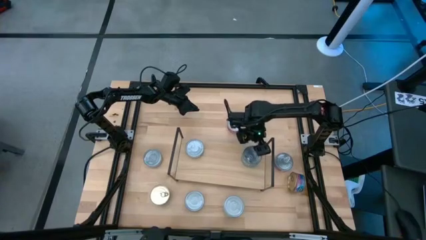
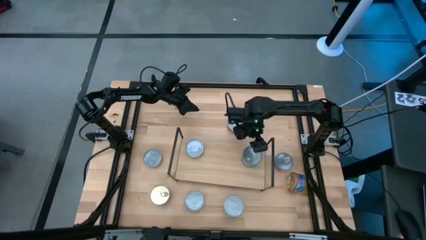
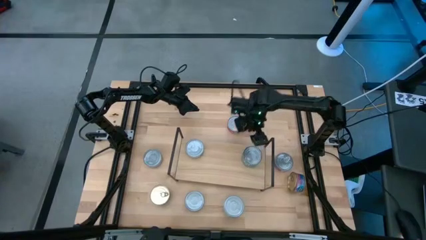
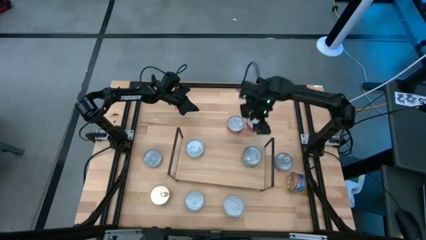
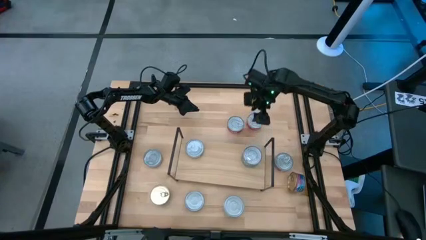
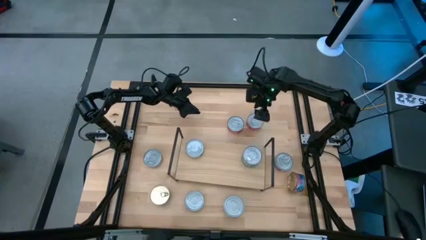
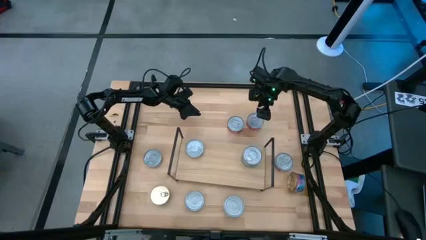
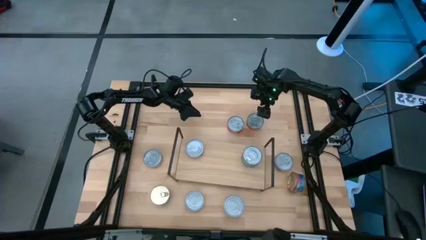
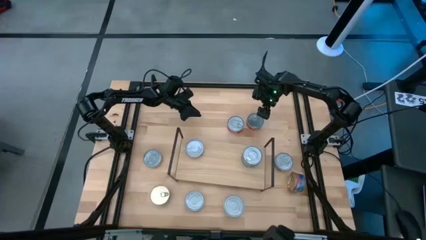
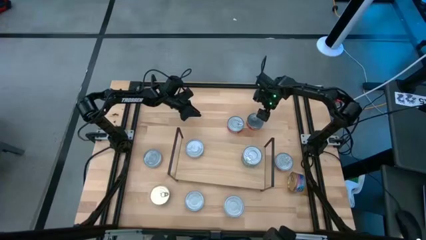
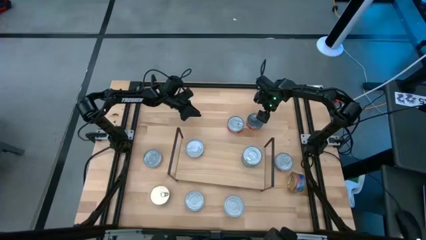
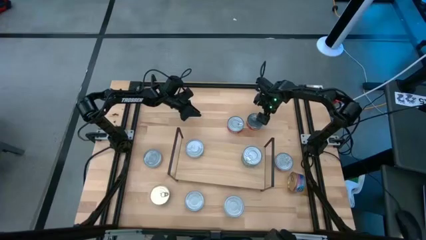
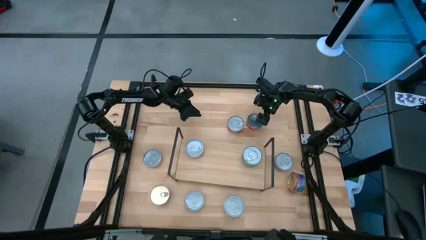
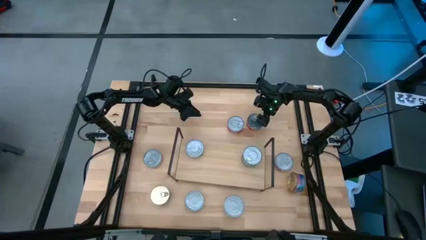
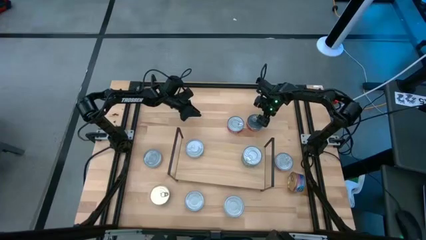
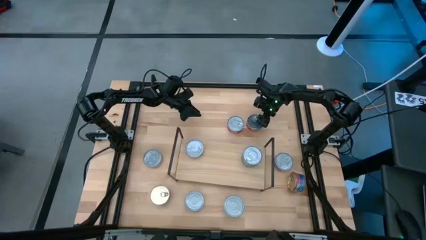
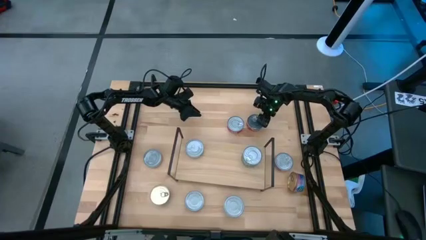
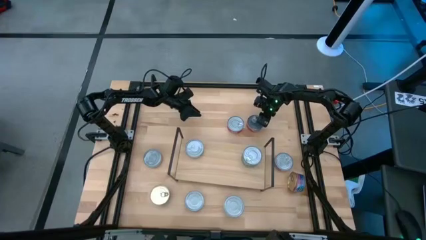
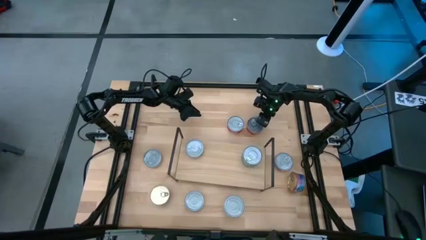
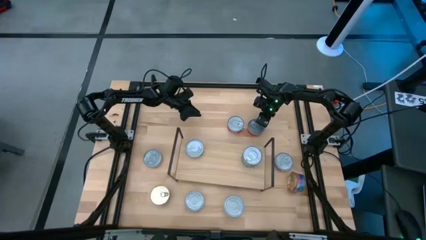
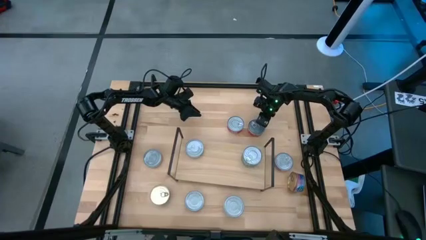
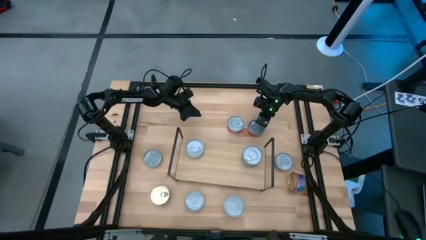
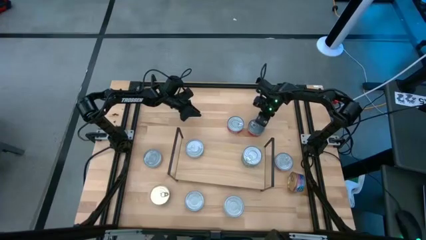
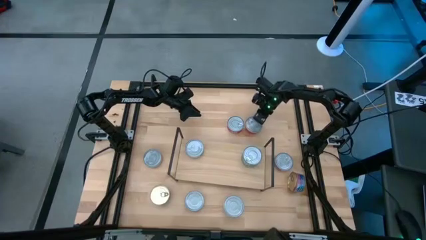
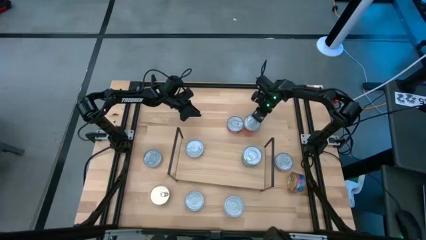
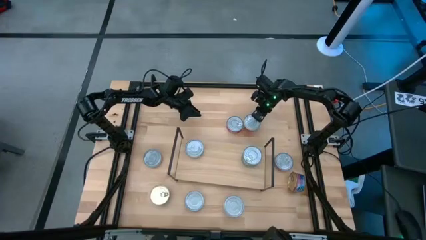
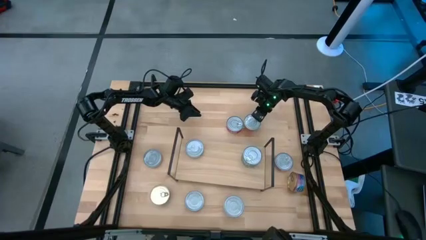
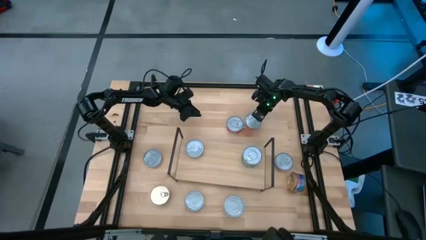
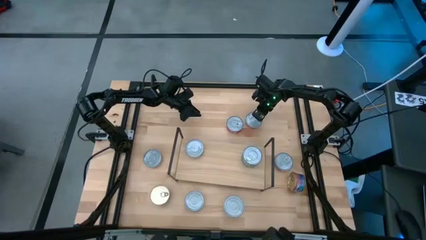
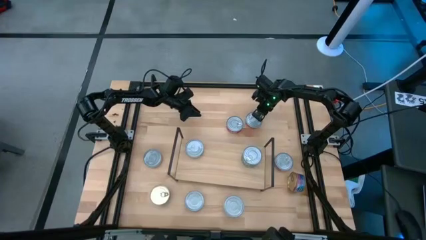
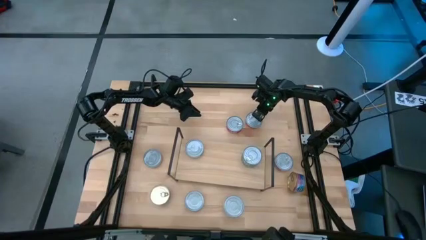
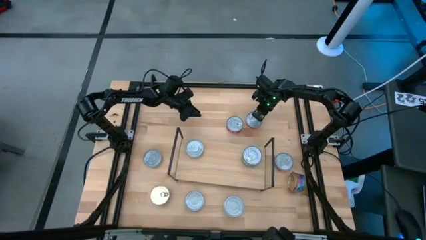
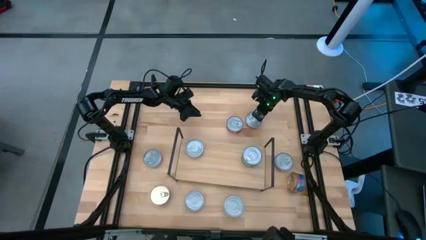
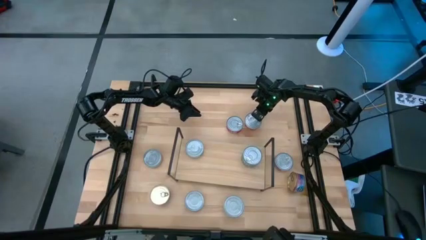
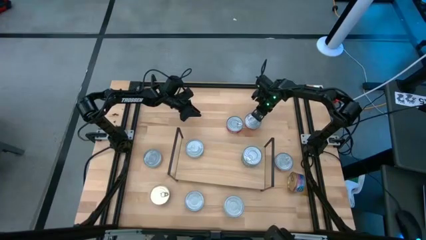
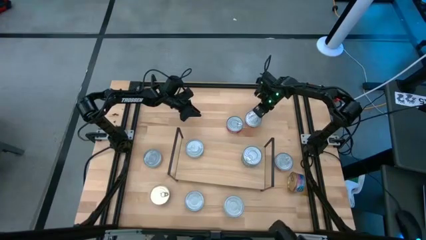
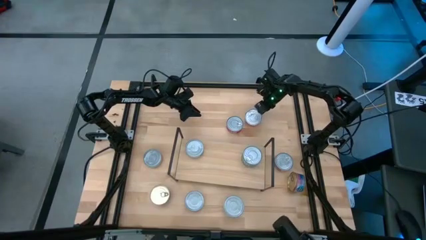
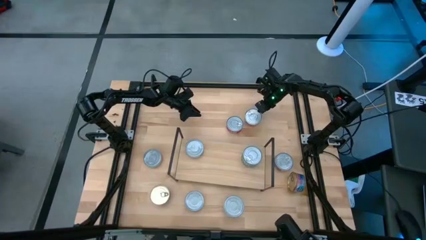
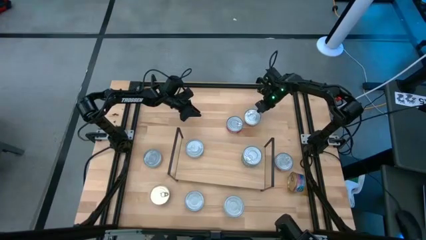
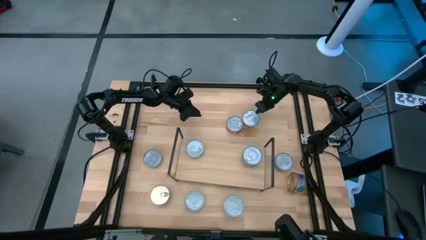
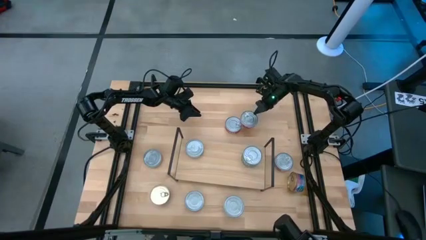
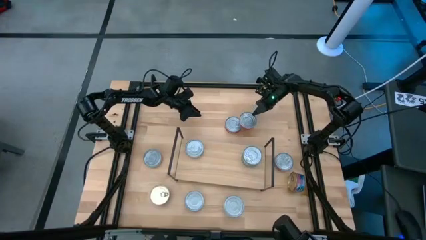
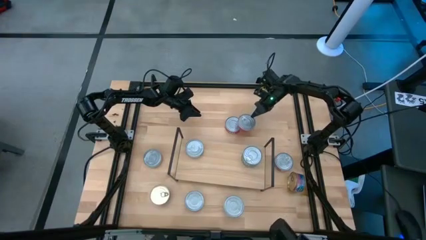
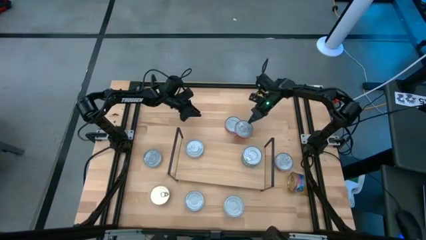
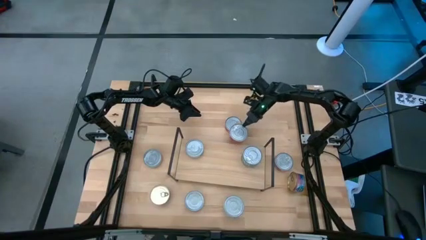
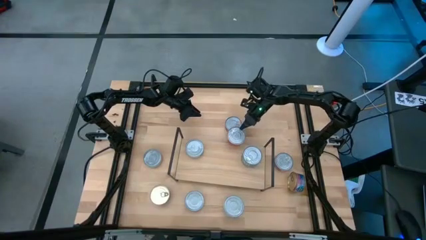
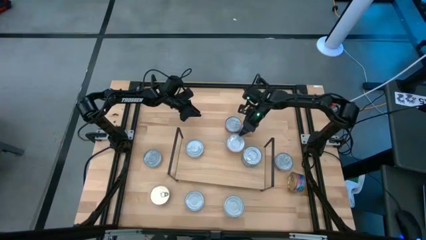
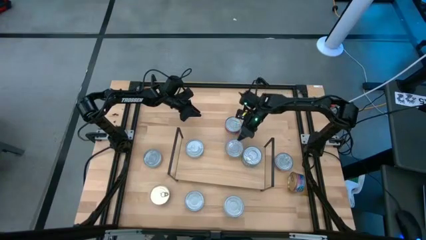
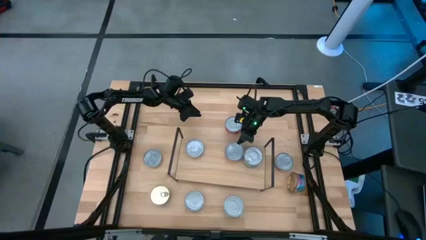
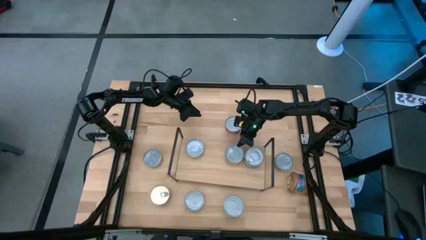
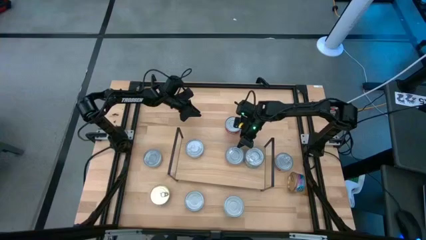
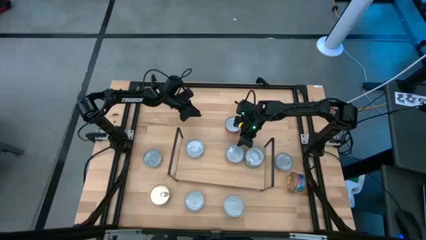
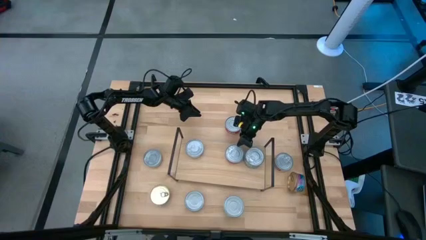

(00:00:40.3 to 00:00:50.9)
Task: Stack canned seafood by type on shelf
Put the red tuna can on the shelf

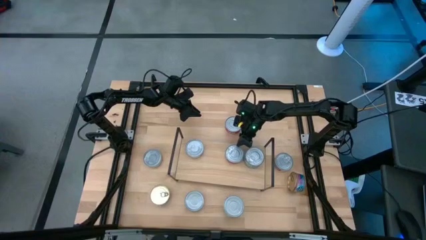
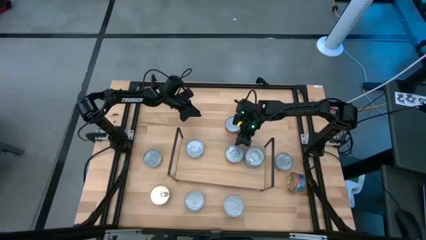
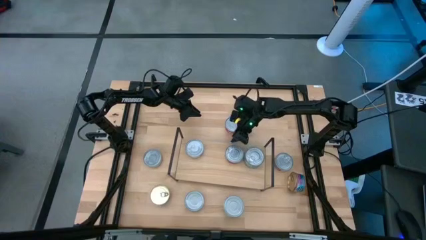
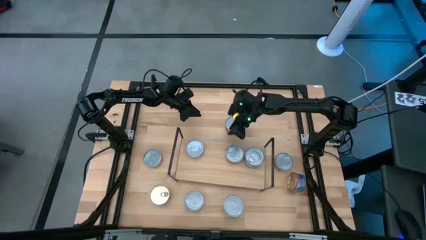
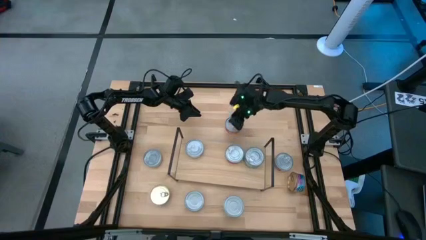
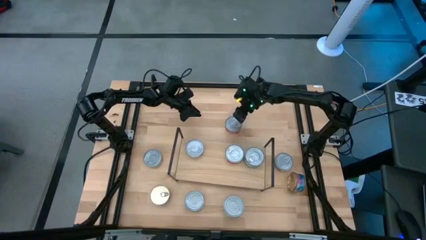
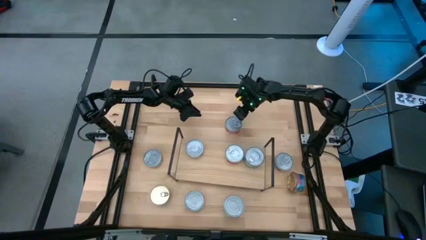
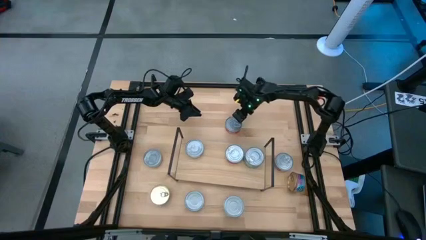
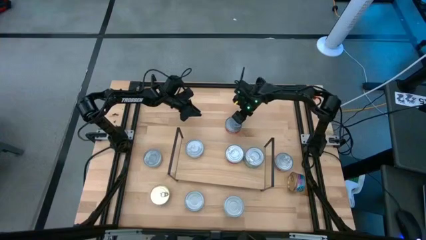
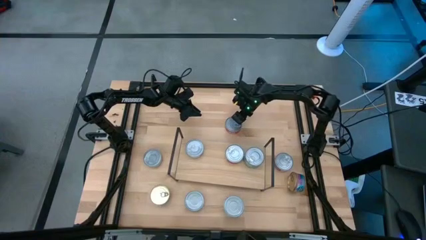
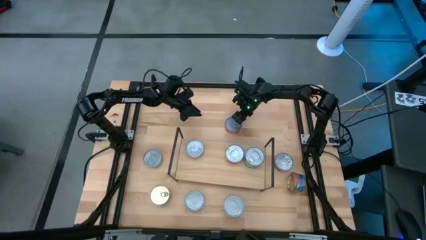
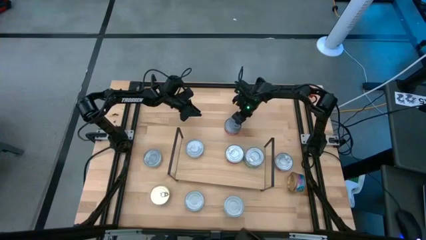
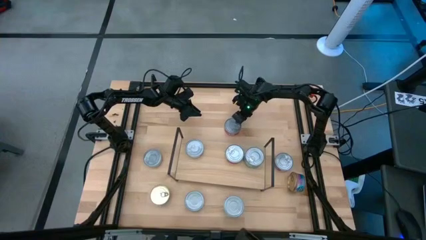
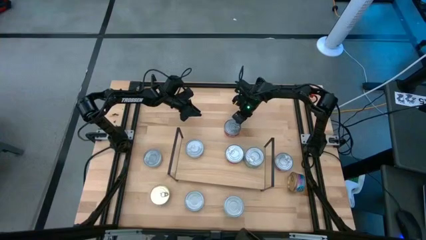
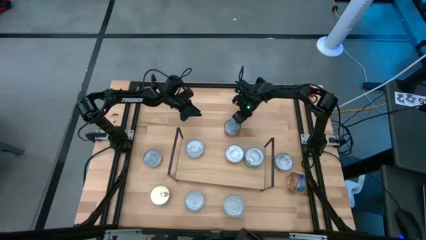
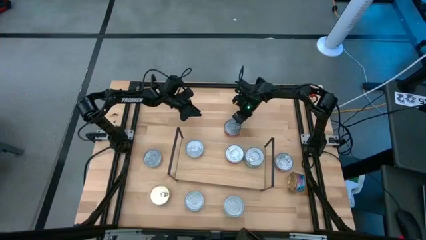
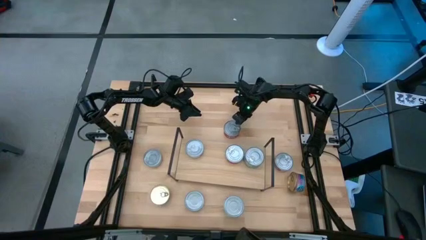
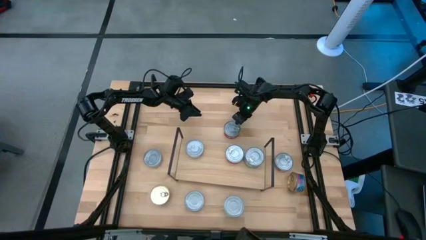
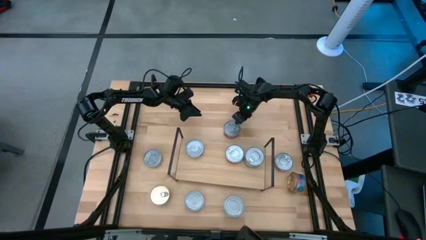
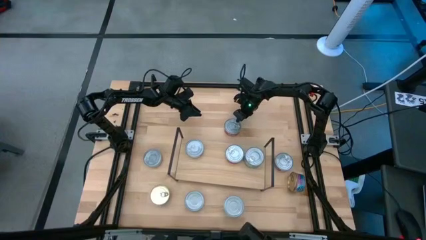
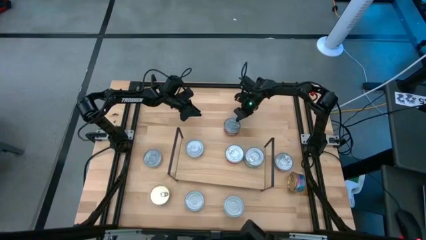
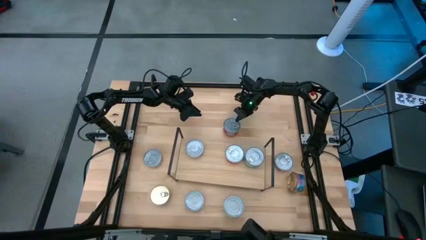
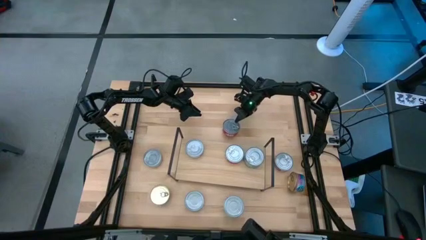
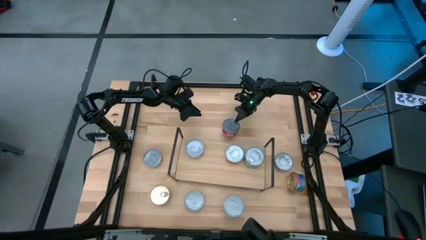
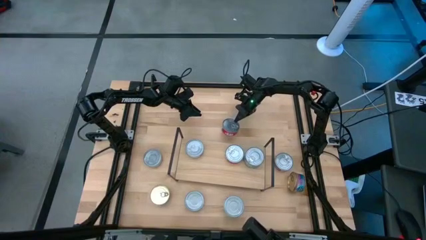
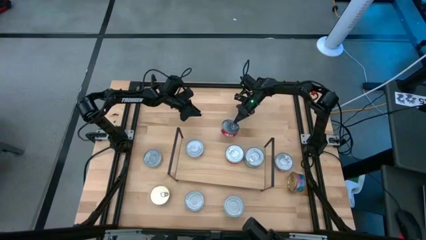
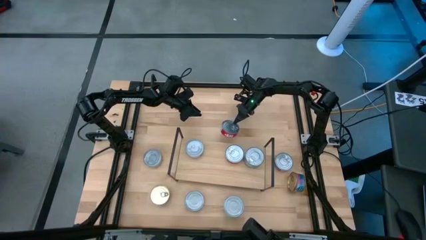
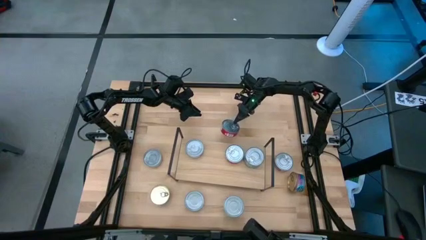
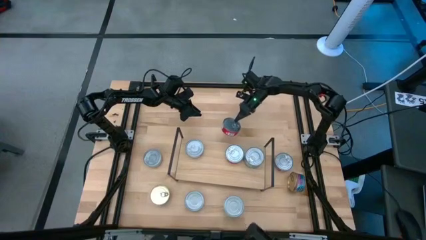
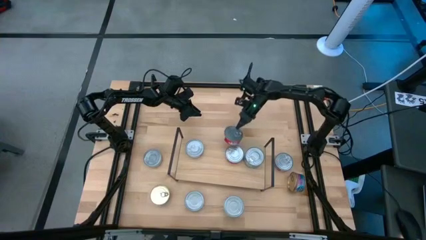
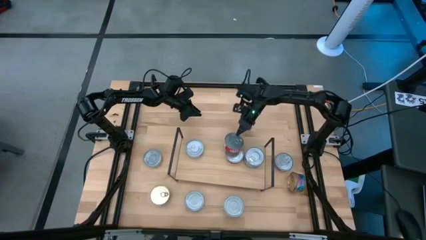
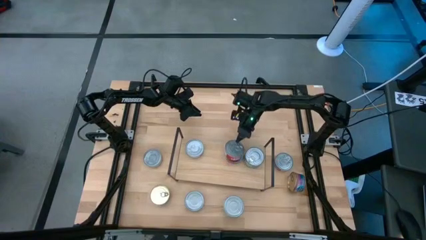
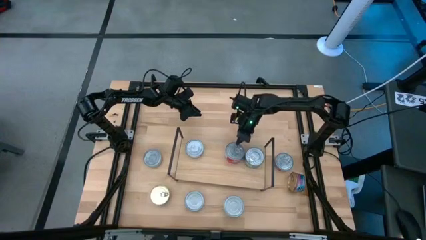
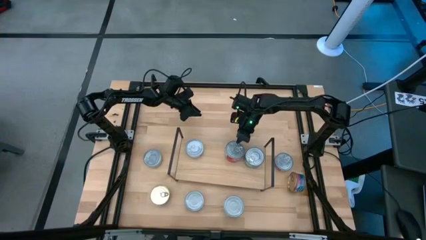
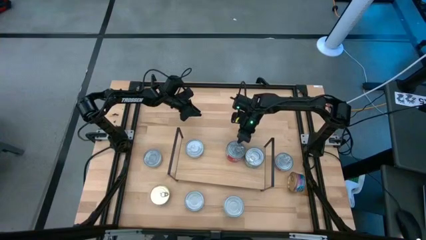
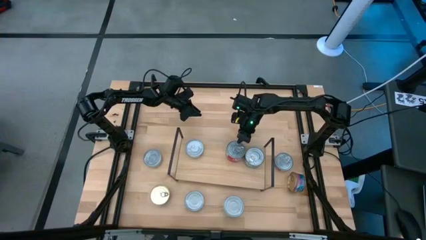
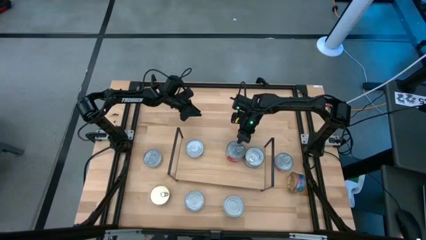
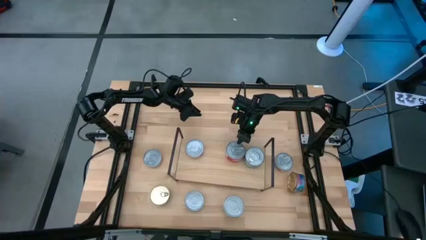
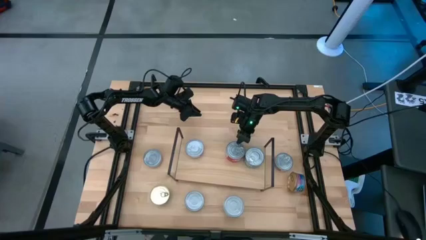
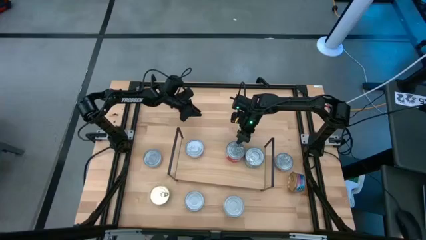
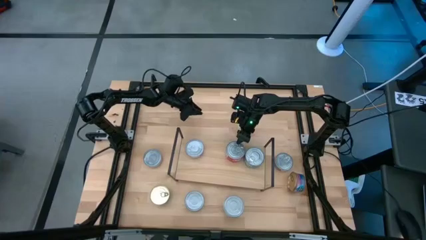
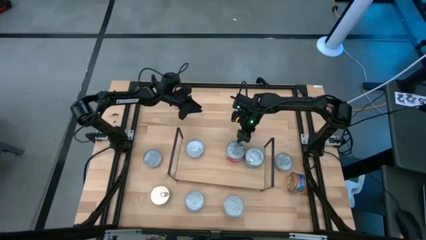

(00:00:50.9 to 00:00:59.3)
Stack the red tuna can on top of the red tuna can on the shelf
